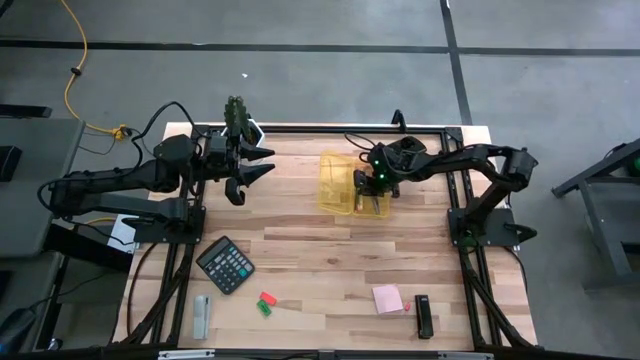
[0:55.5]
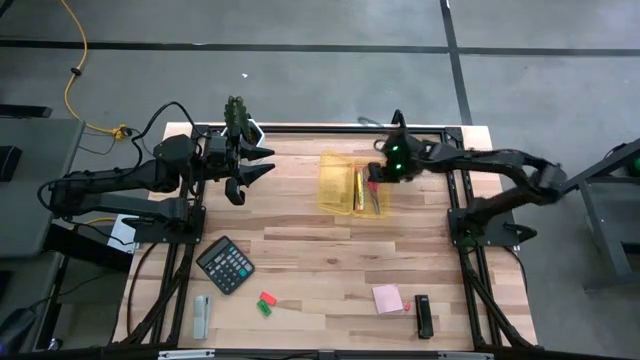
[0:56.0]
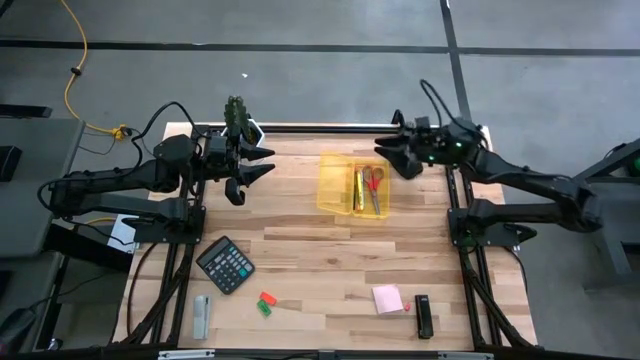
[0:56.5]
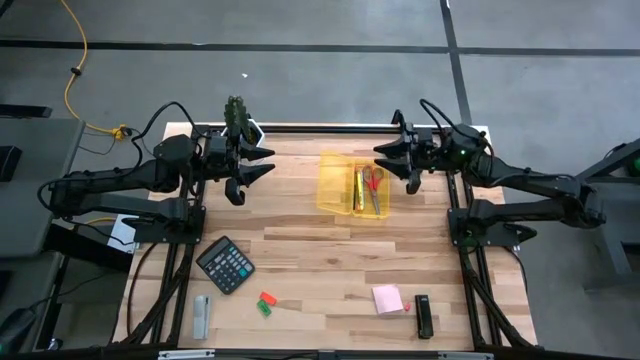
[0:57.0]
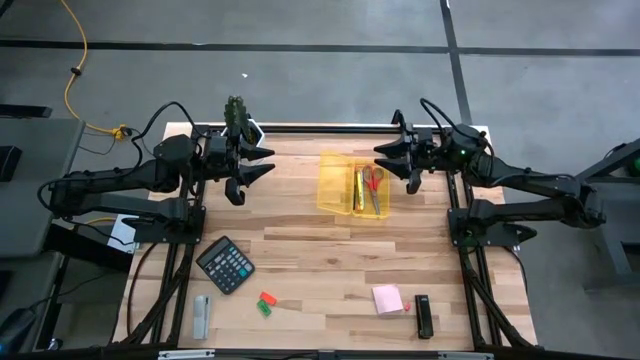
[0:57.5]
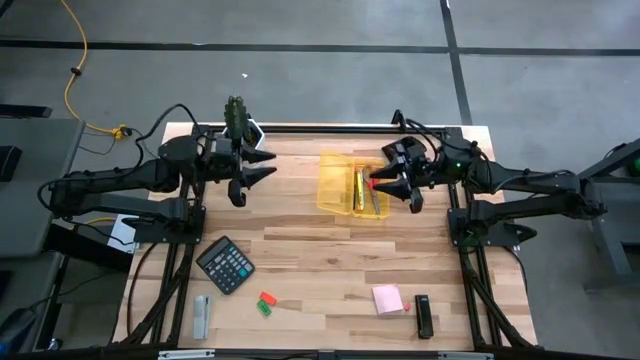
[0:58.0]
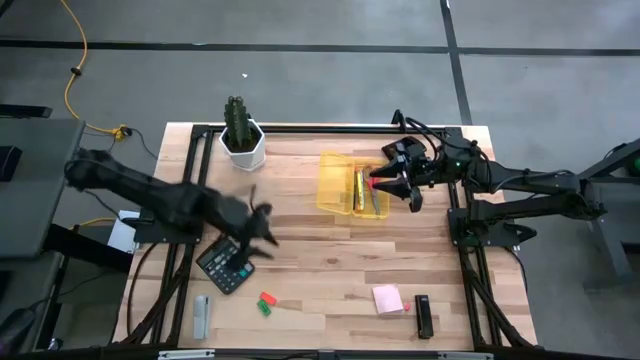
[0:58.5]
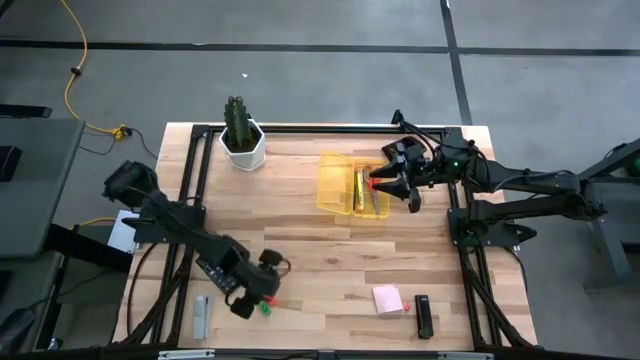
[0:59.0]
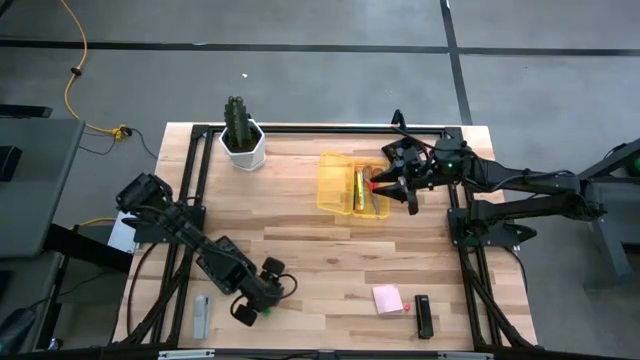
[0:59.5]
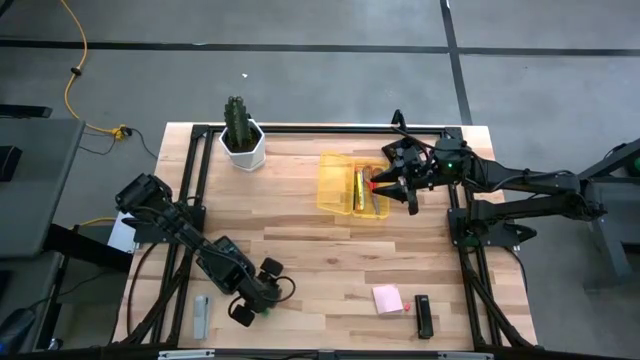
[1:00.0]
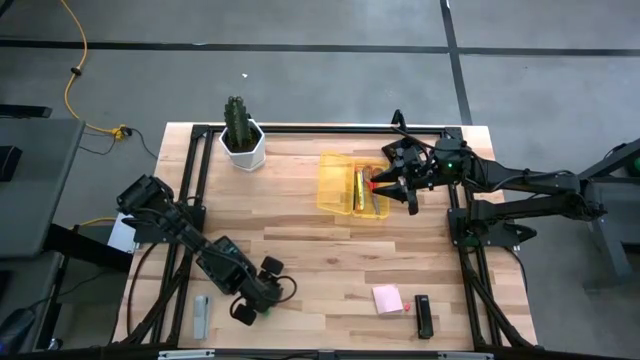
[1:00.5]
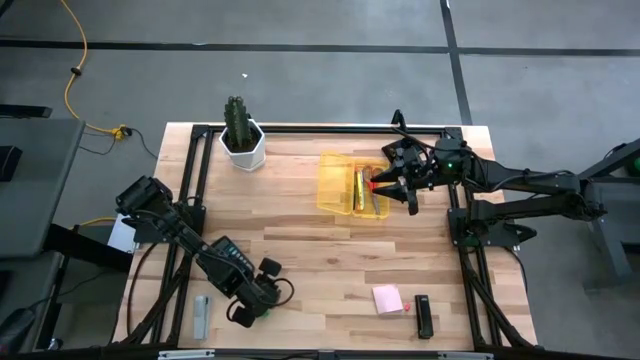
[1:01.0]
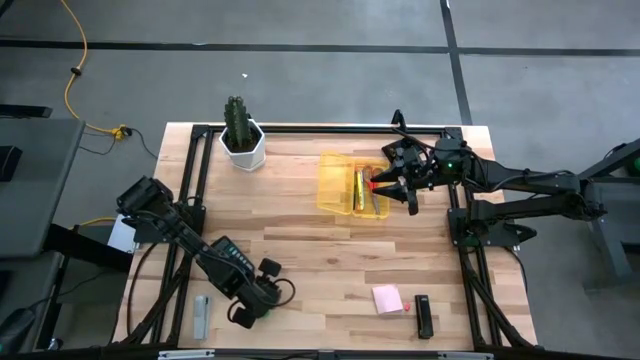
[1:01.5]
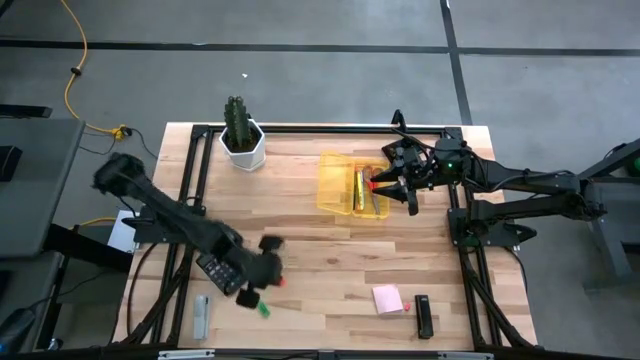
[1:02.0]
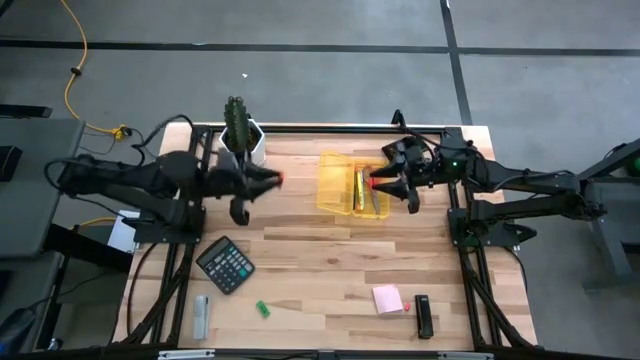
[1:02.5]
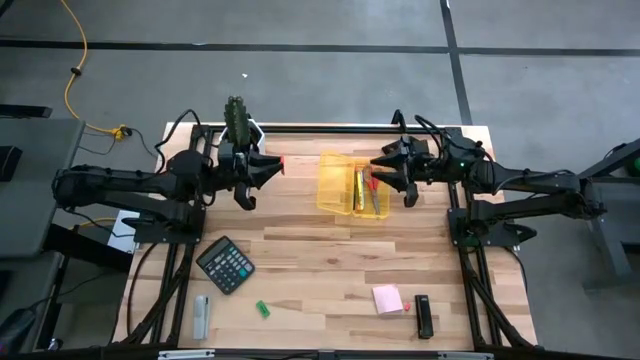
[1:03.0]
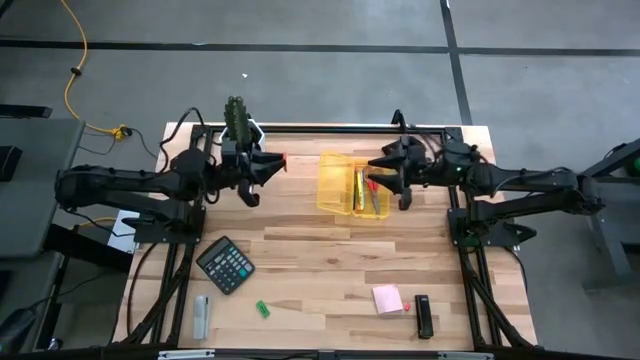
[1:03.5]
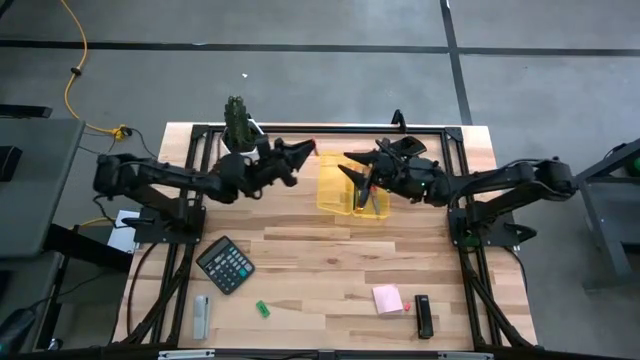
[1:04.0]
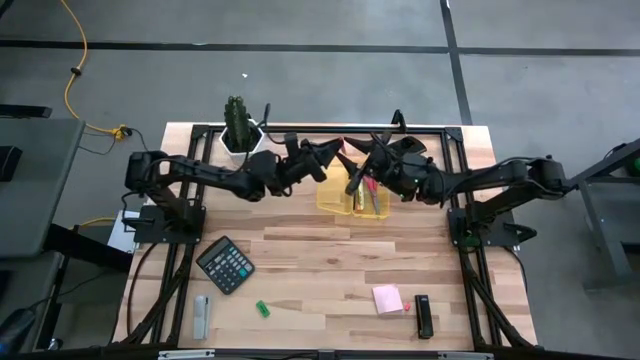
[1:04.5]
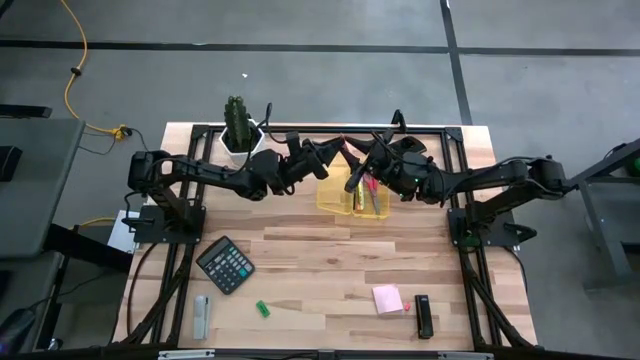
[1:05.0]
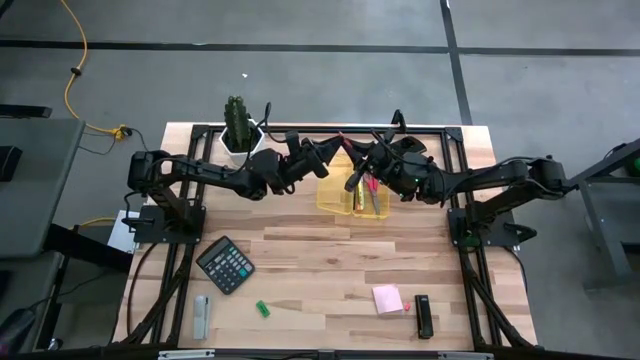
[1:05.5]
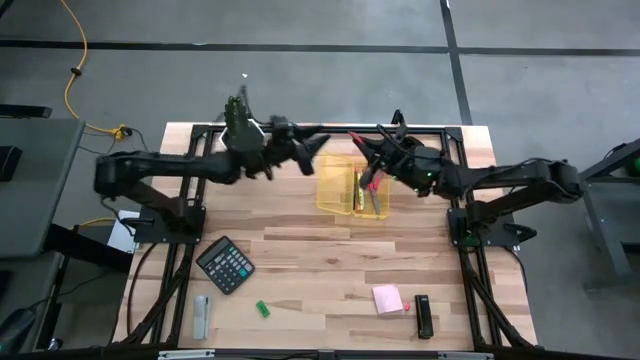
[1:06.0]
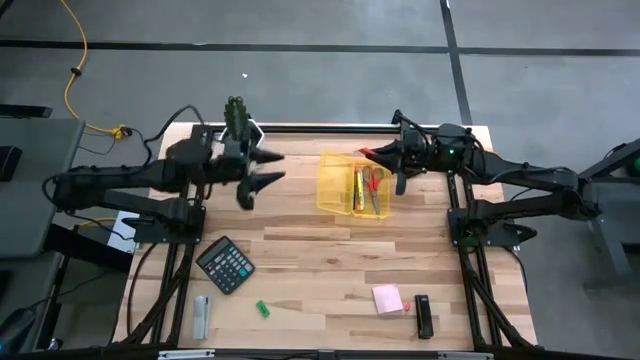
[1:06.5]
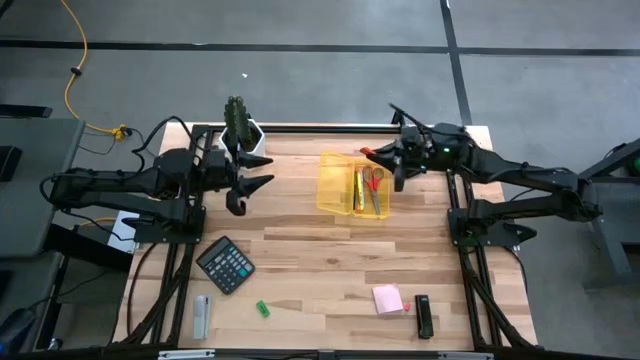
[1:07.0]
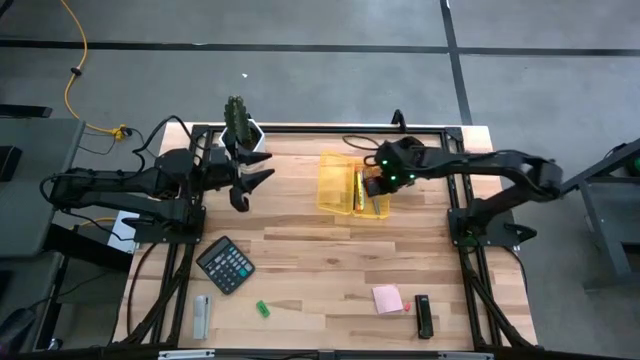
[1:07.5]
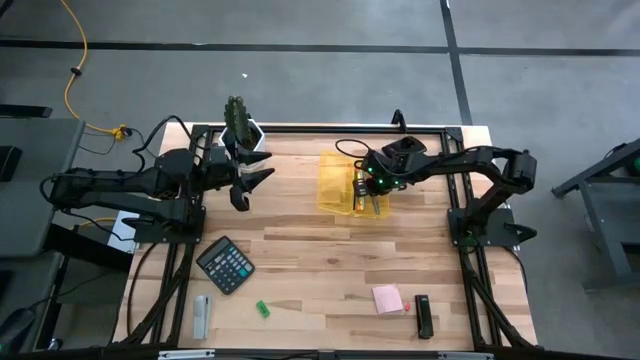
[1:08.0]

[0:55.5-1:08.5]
Task: Pack school essentials
Put the orange eraser into the yellow supply box

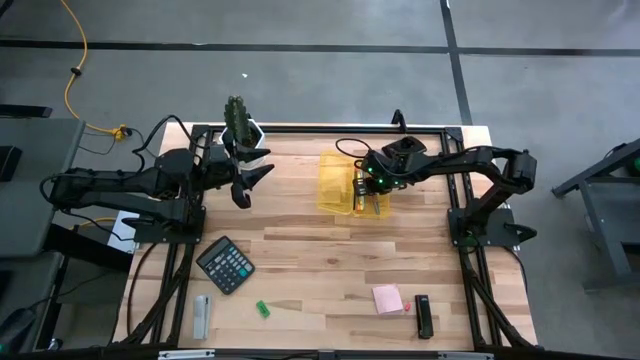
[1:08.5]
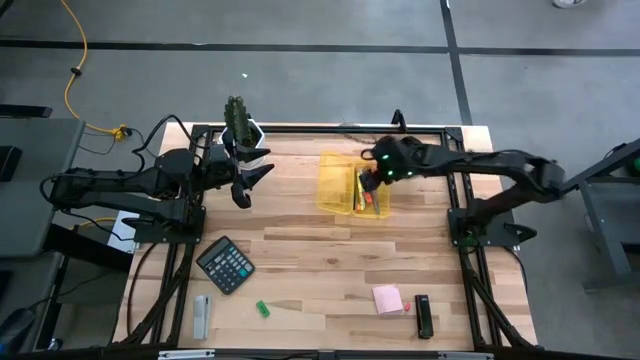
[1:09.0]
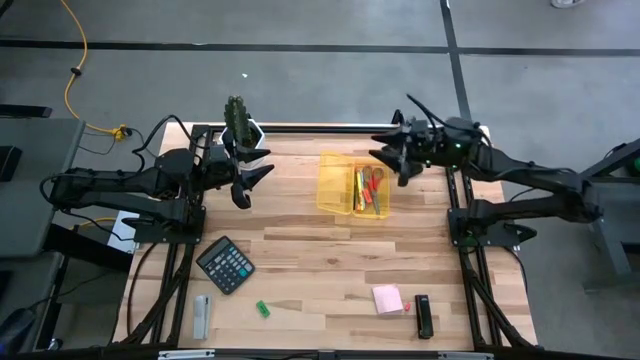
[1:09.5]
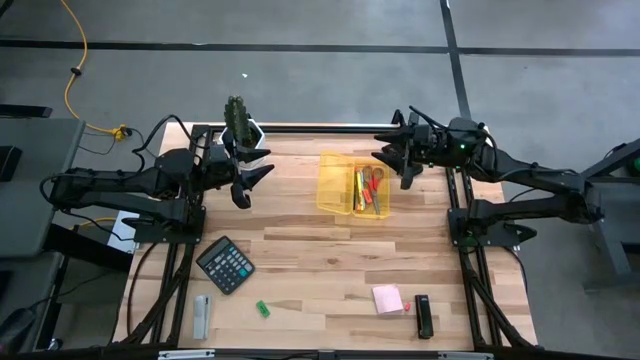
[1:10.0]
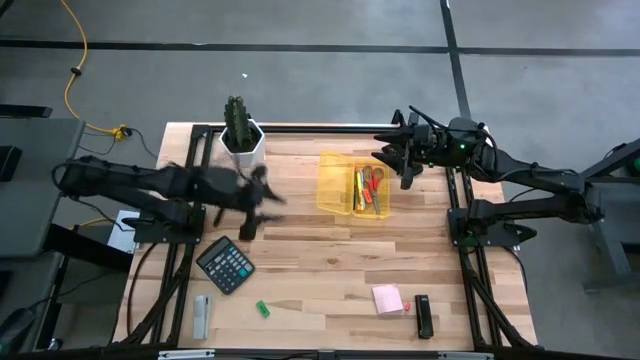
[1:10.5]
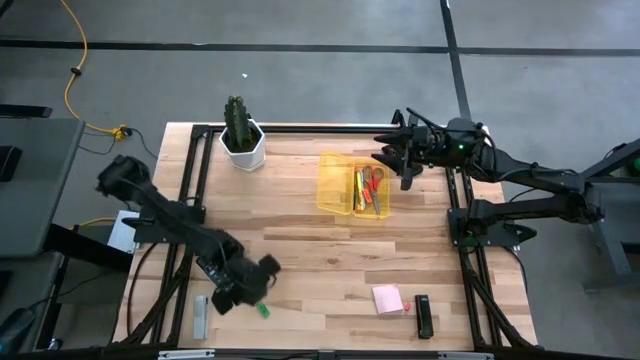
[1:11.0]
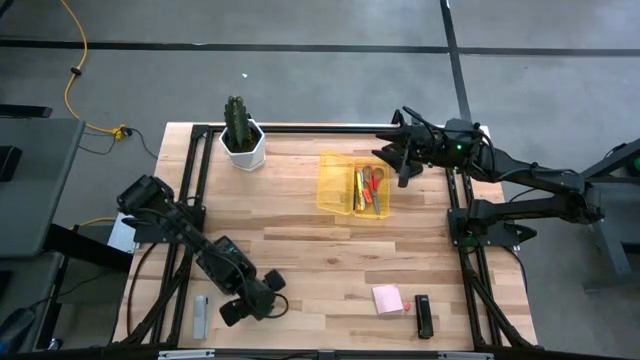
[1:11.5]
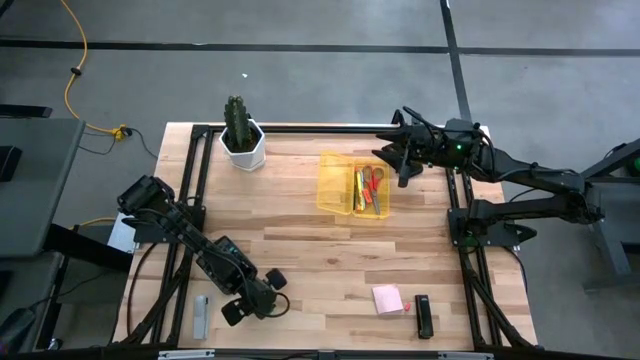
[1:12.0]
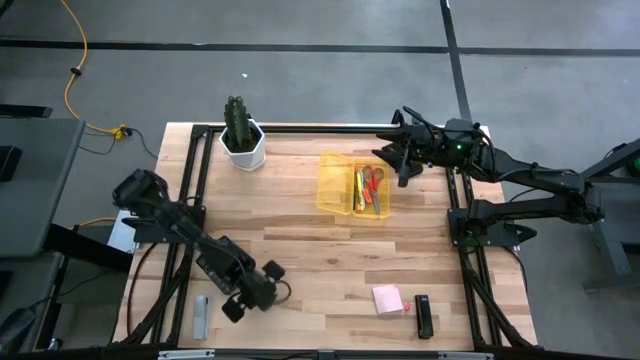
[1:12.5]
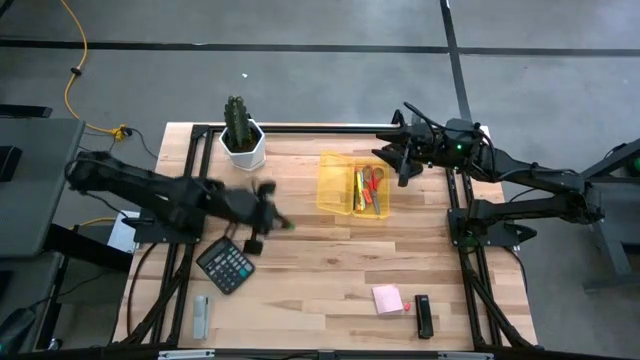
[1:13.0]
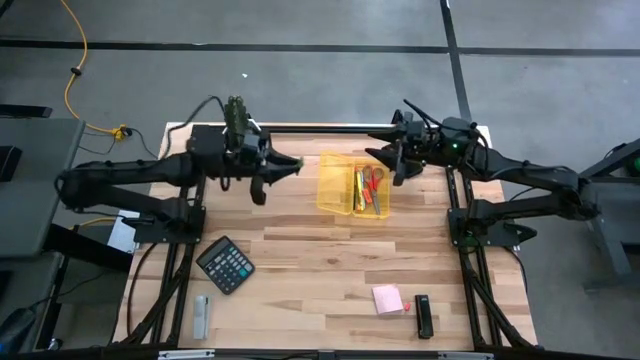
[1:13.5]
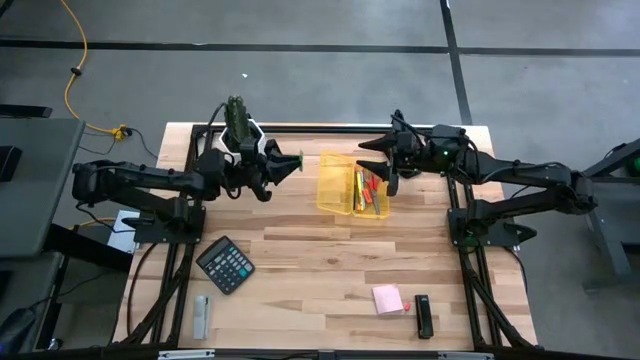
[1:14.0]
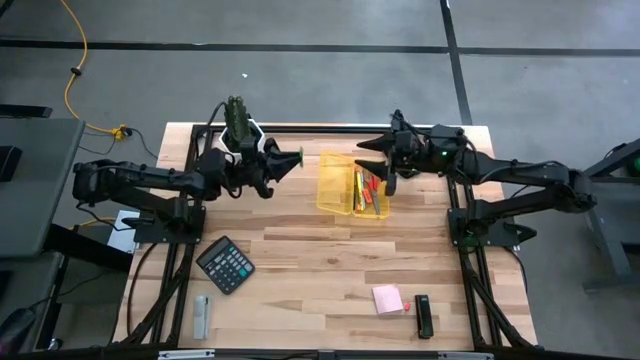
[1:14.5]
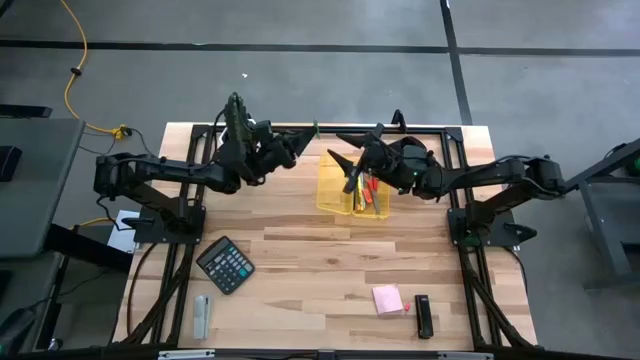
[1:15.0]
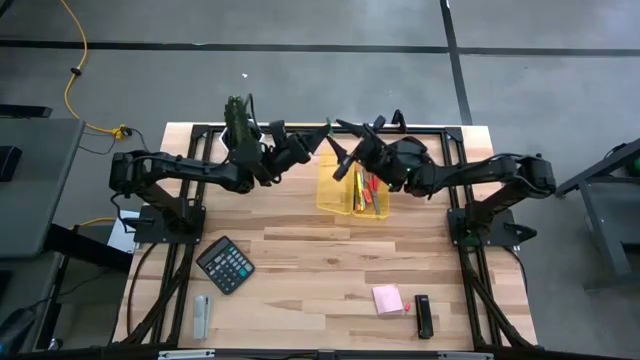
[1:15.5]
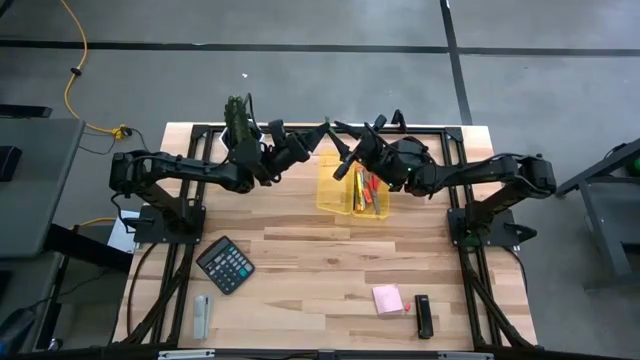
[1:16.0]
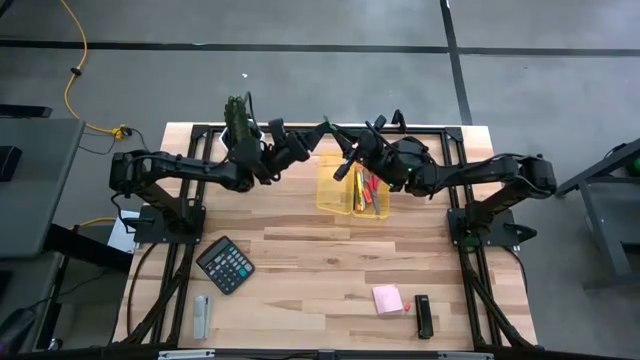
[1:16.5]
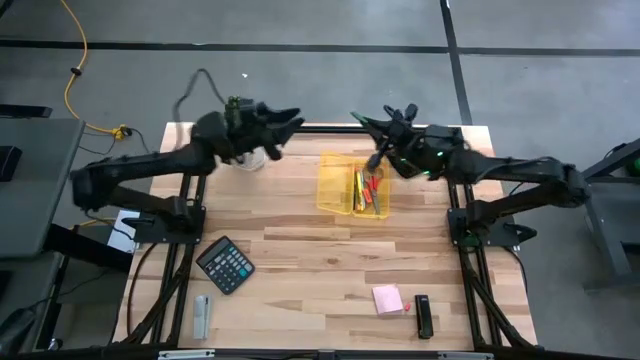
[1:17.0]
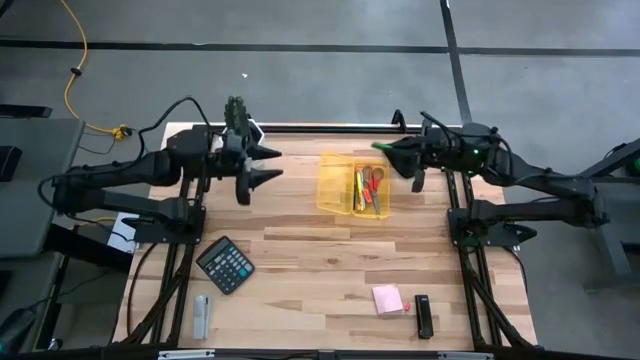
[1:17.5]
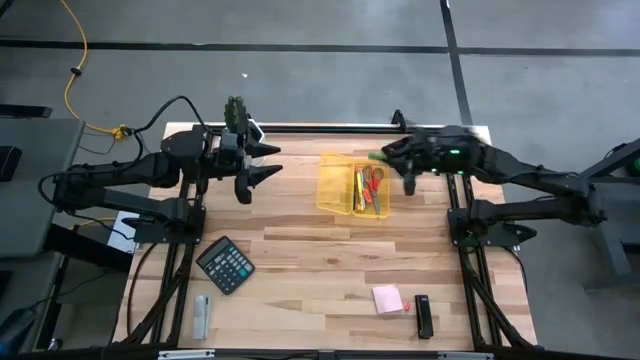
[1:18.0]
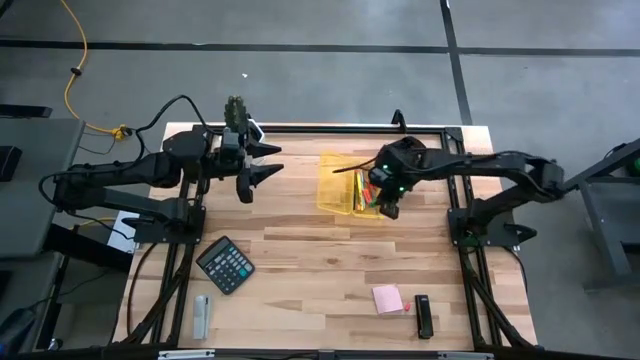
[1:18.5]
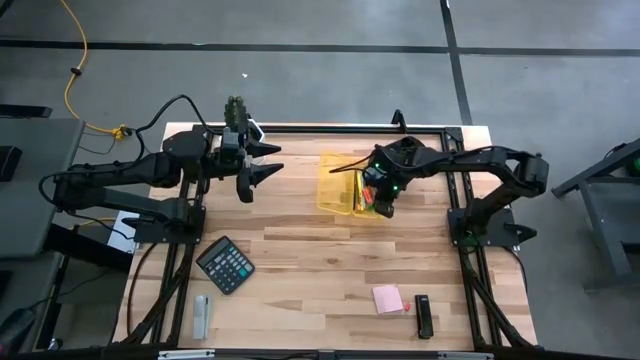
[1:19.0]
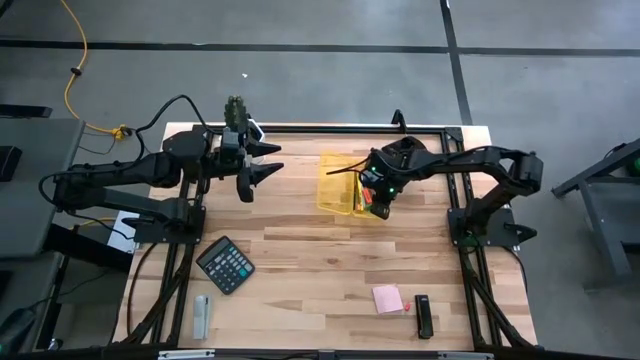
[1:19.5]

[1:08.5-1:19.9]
Put the green eraser into the yellow supply box
